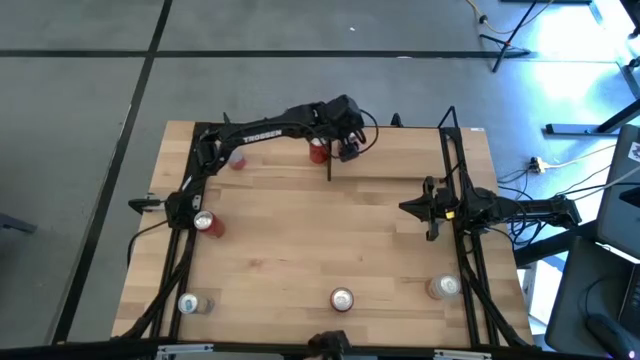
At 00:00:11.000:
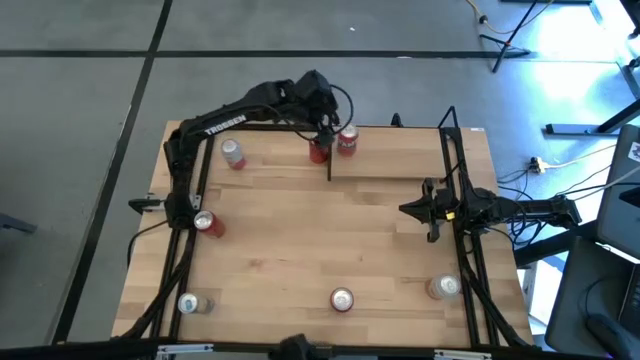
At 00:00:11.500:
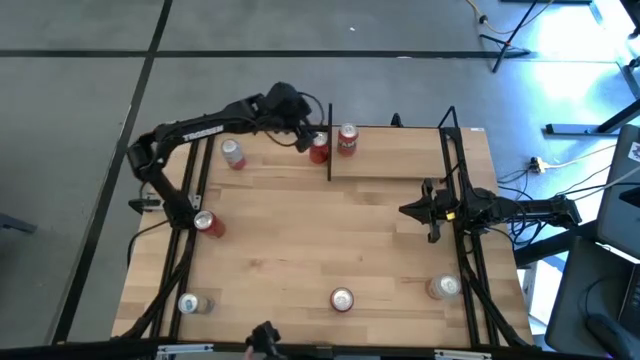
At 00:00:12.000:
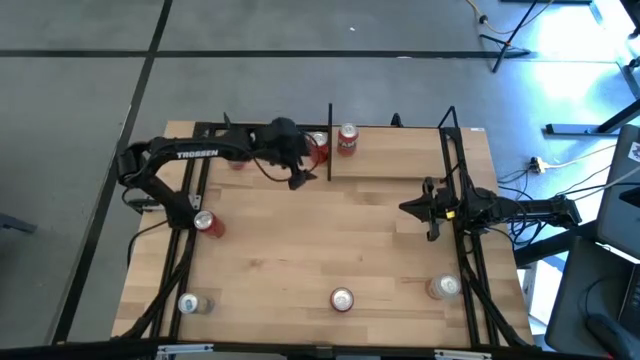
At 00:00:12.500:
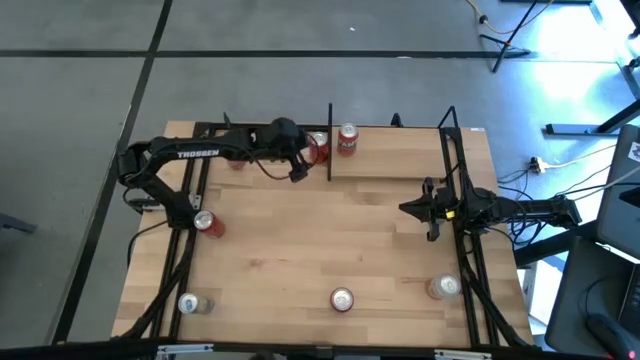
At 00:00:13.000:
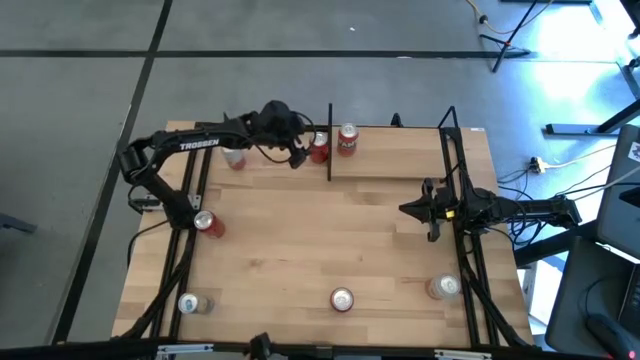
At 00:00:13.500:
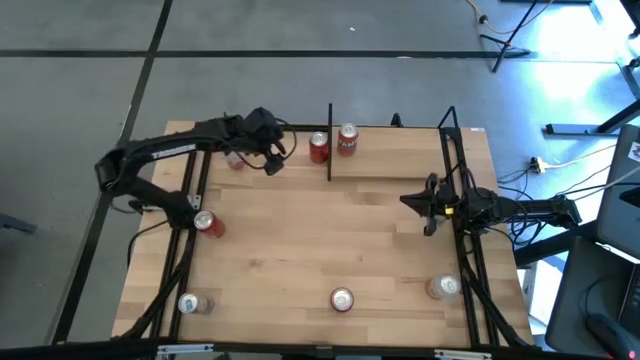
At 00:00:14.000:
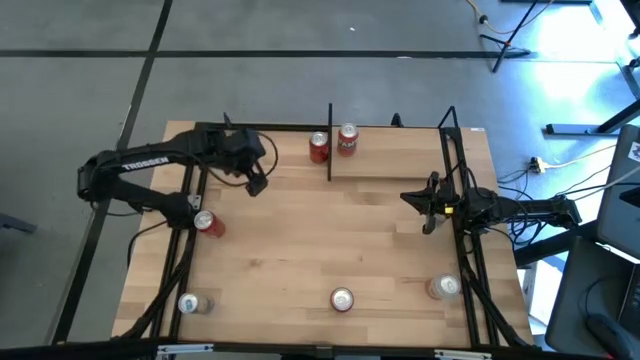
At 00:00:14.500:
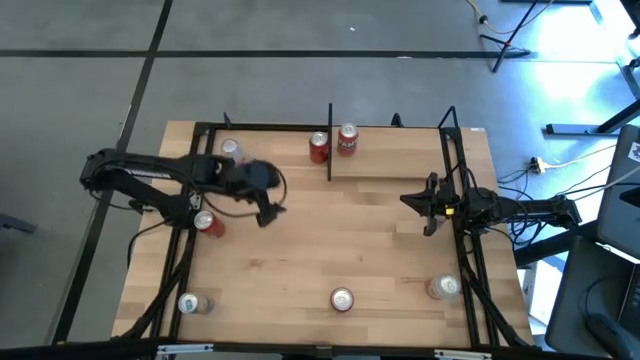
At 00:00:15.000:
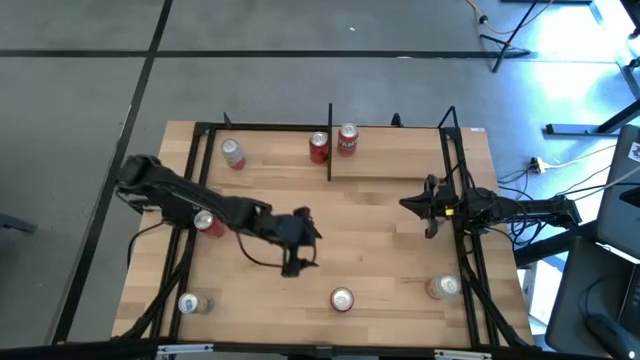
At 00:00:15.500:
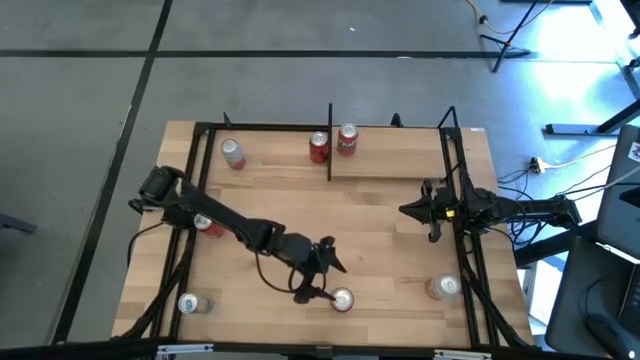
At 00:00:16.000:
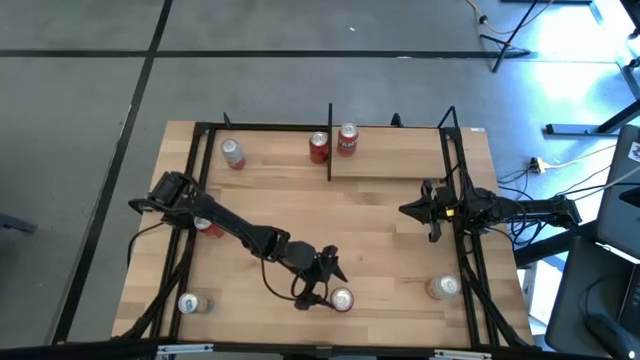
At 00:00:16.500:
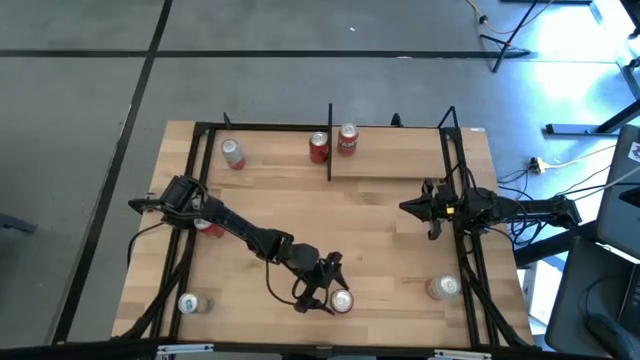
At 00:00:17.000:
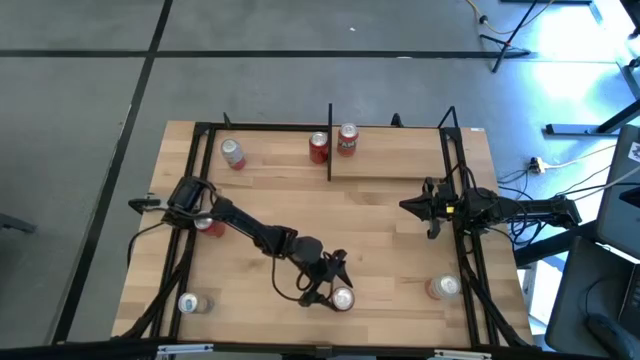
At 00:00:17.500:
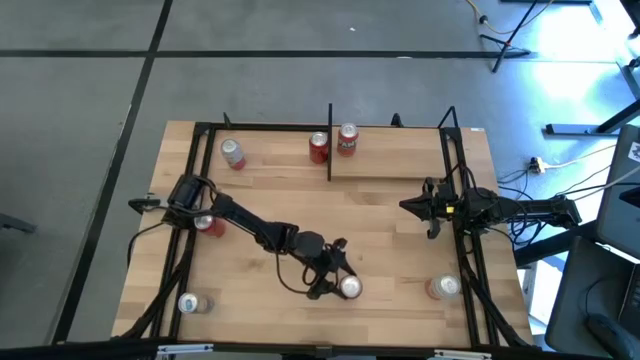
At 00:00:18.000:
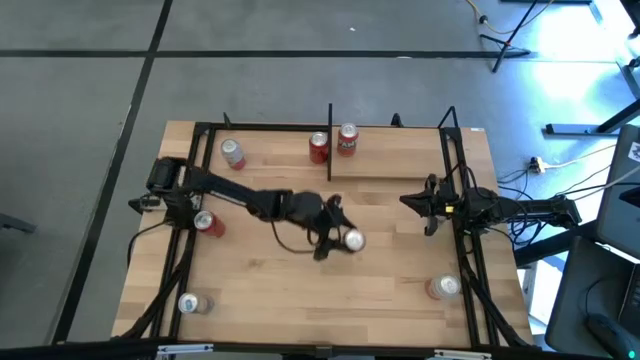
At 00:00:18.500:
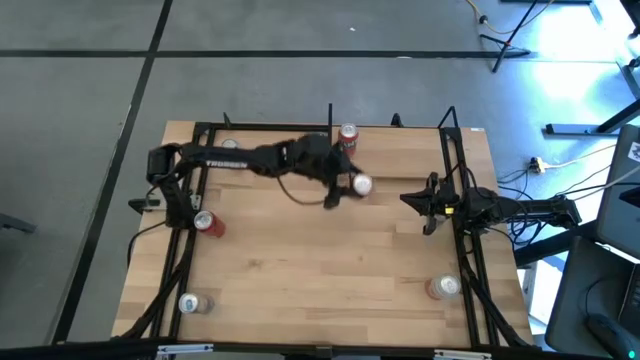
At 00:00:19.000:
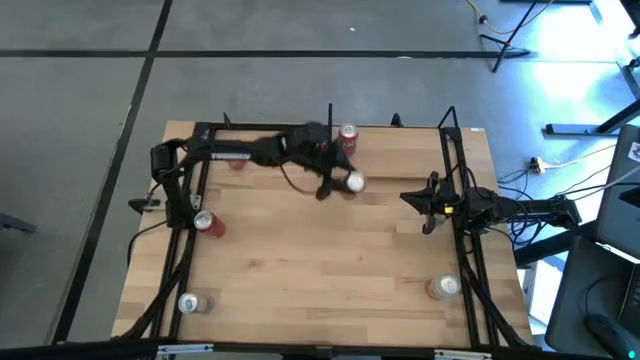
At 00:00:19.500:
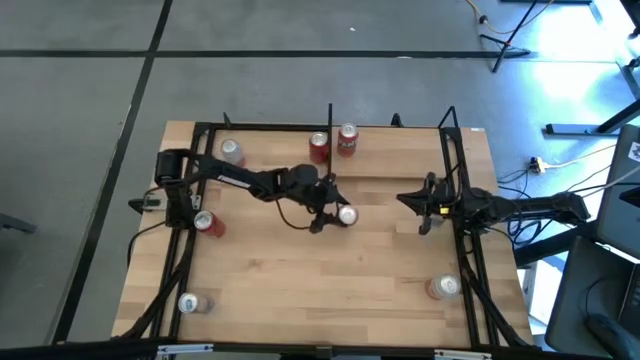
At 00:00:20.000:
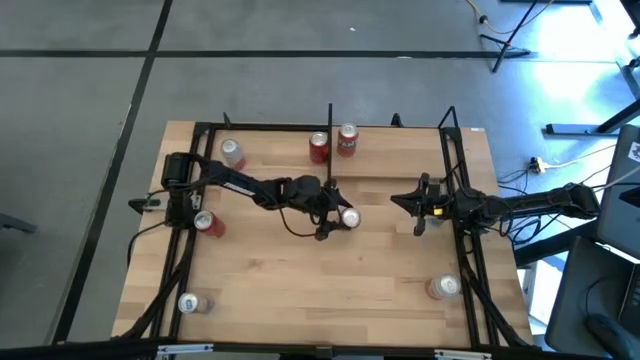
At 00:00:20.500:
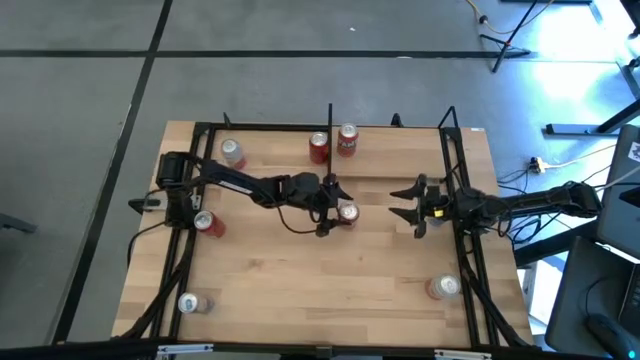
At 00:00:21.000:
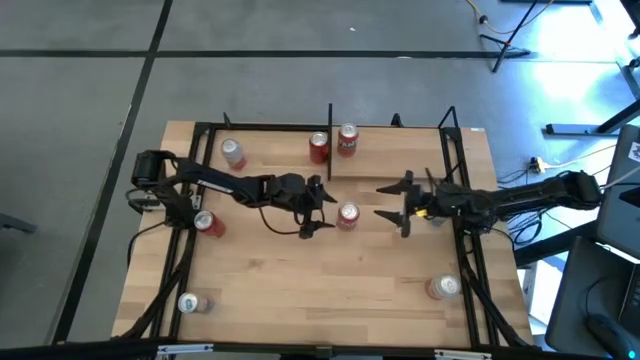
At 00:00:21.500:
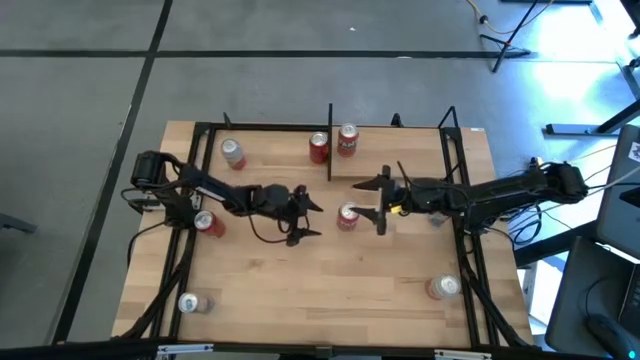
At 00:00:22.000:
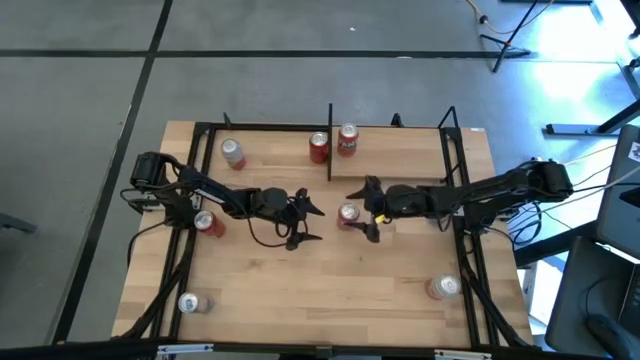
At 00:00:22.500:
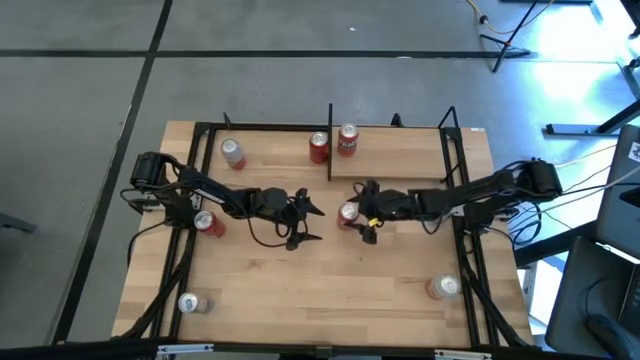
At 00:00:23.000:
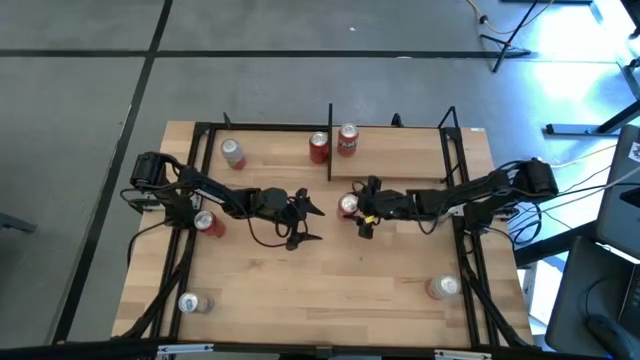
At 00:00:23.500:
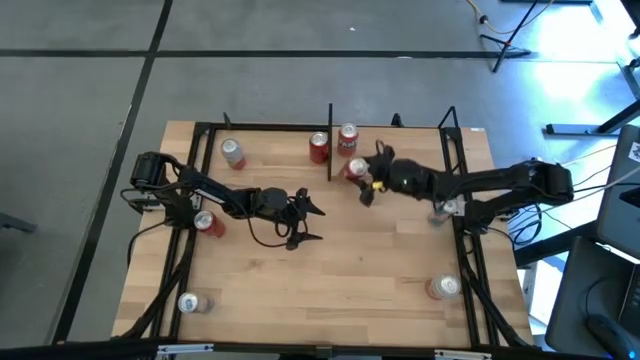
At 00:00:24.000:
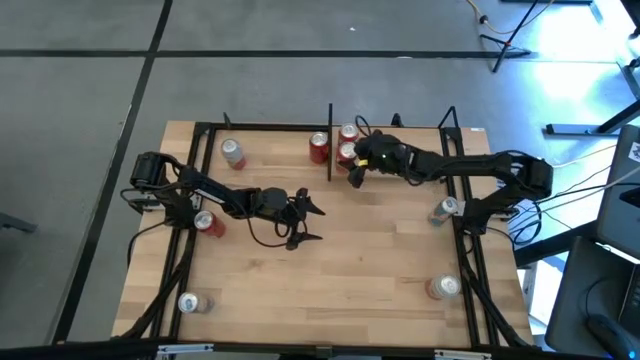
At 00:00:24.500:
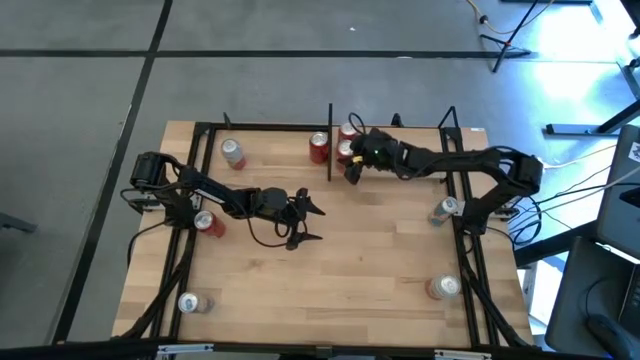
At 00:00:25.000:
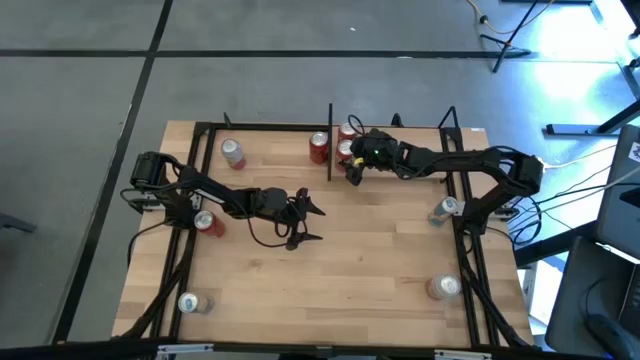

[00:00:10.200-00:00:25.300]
Task: Place canned beverage on shelf
Put the red soda can on the shelf aligned with the other red soda can

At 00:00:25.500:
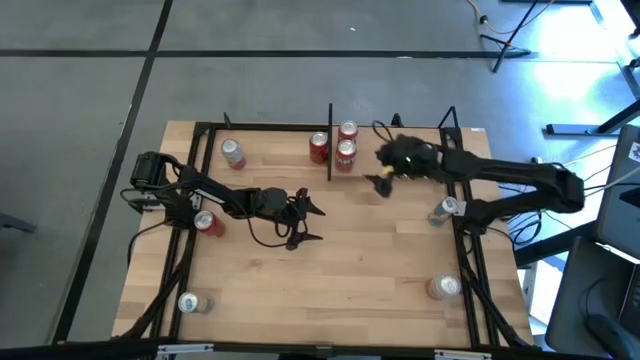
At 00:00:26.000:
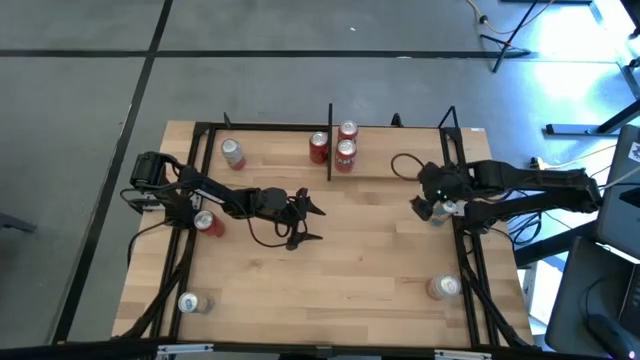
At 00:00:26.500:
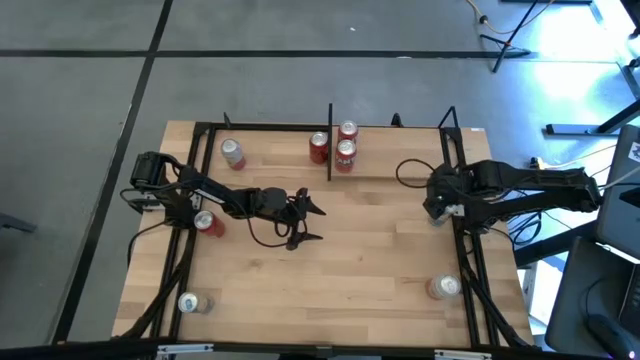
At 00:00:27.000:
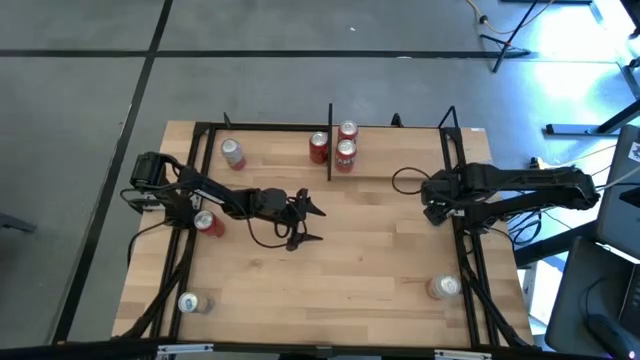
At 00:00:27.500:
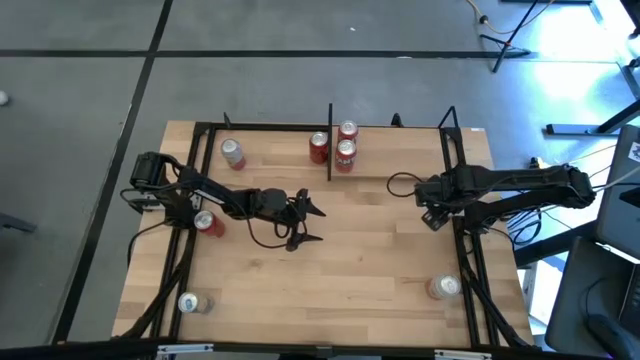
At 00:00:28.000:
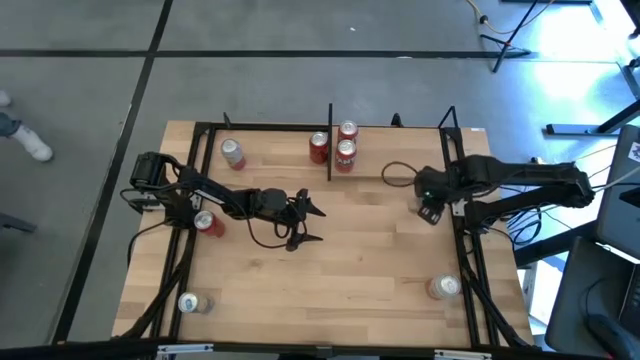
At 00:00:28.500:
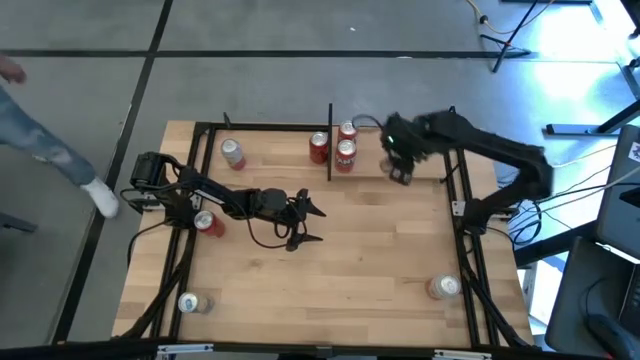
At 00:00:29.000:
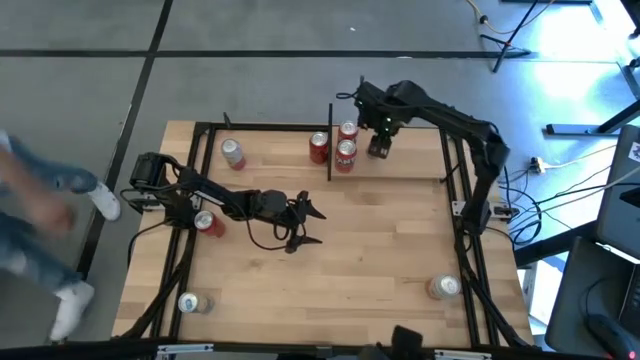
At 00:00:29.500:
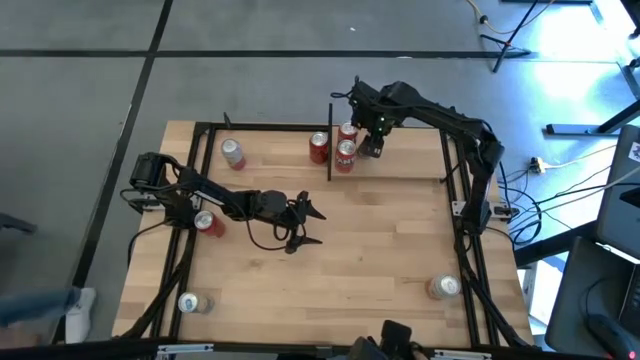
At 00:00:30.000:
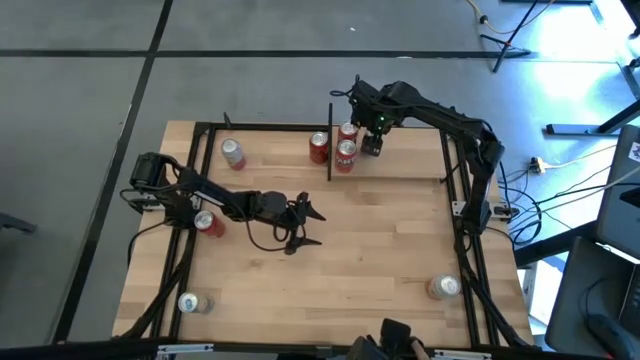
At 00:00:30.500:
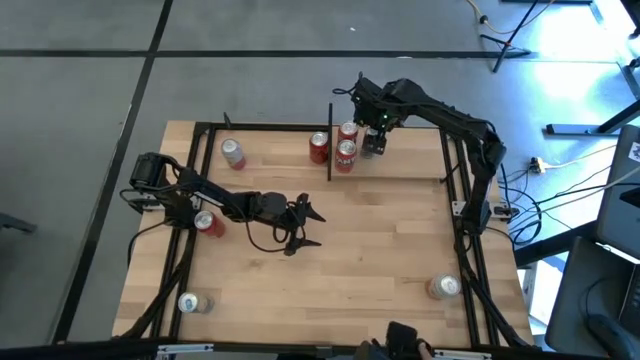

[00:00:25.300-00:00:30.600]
Put the top blue soda can on the shelf
